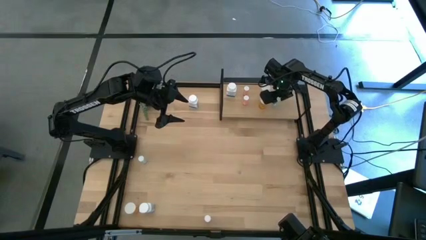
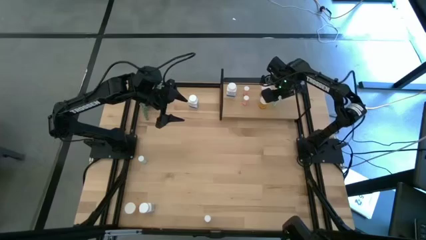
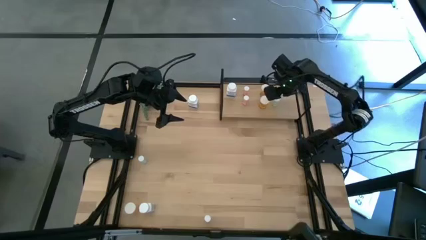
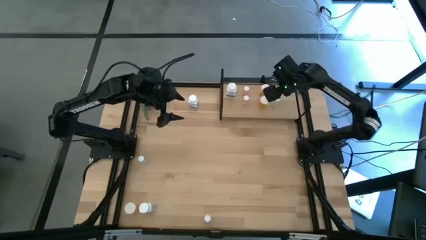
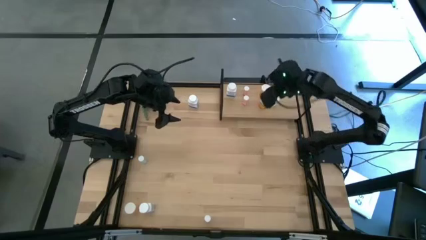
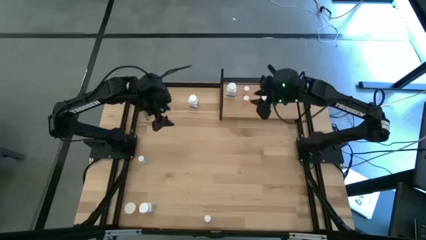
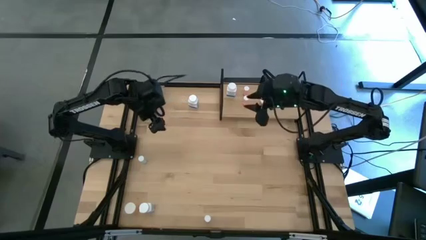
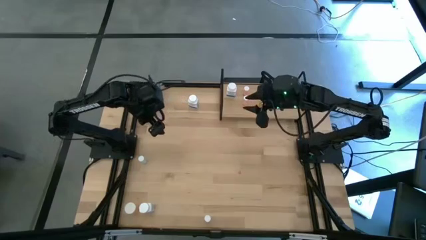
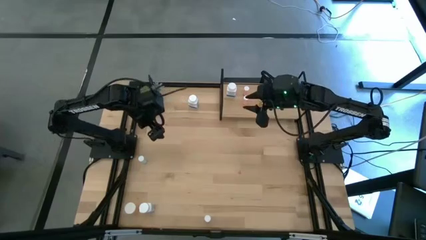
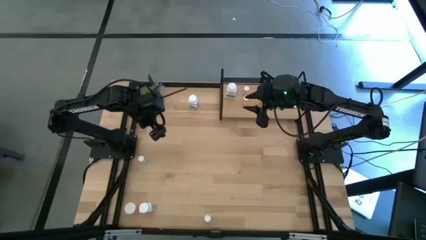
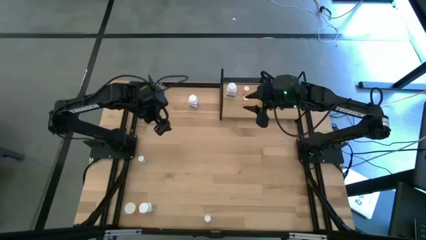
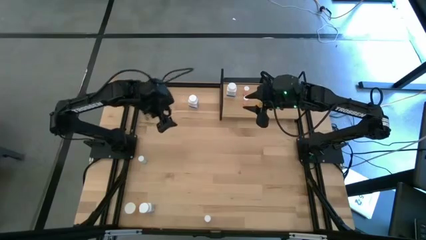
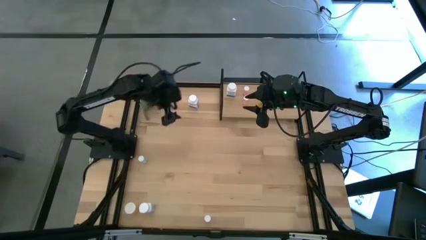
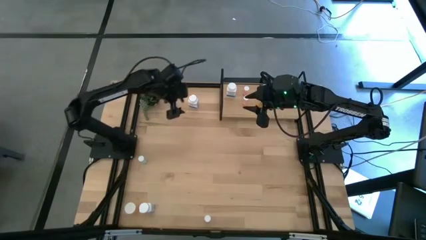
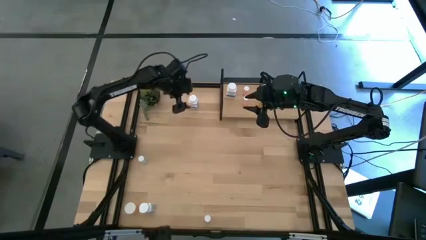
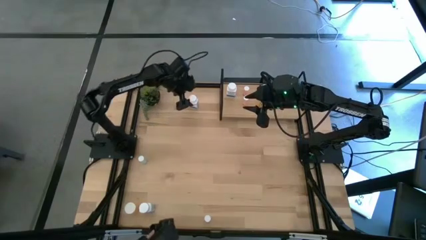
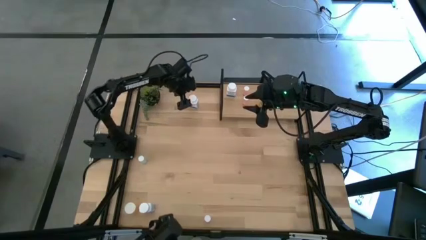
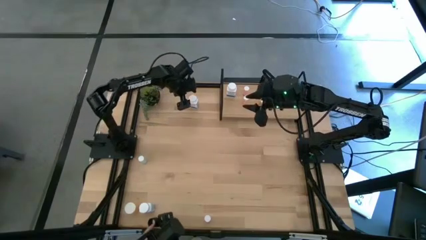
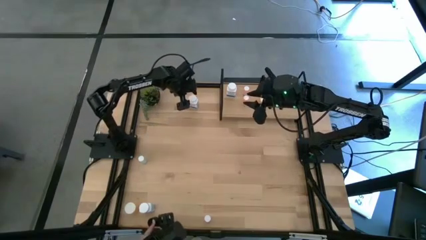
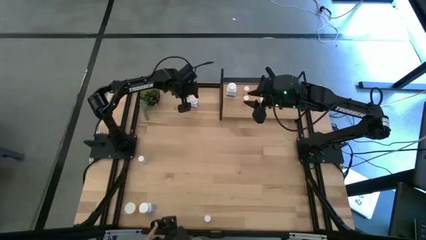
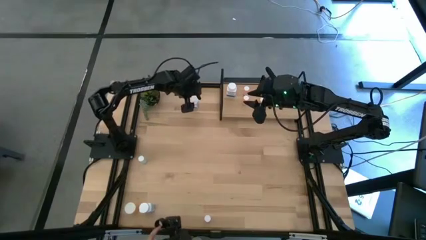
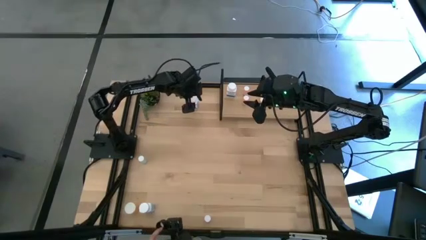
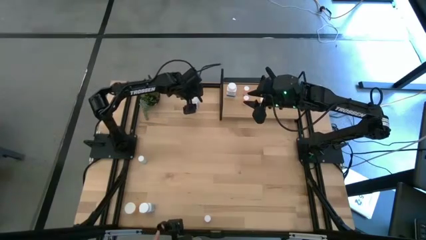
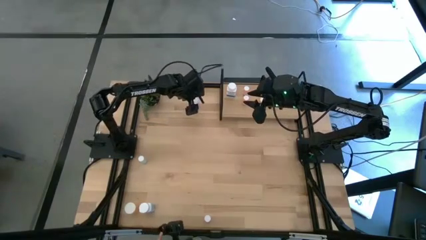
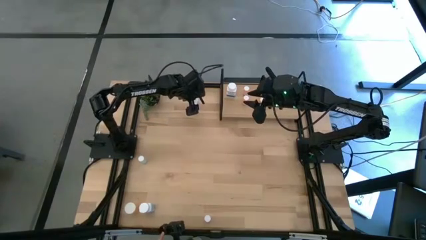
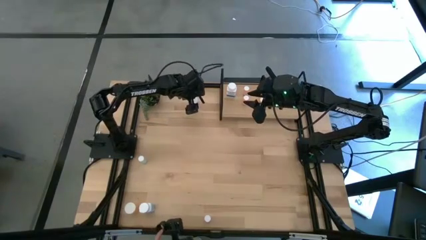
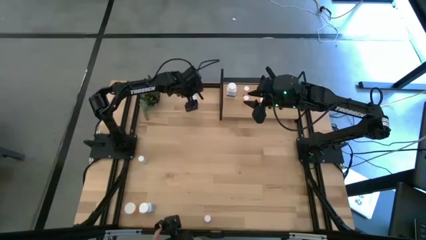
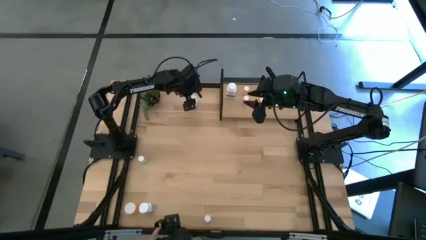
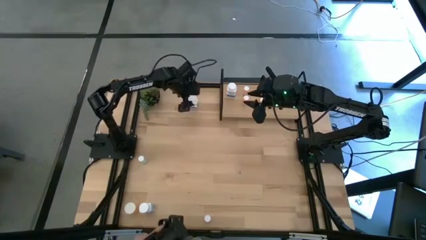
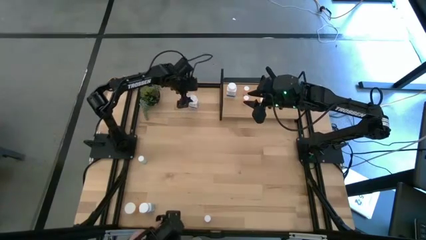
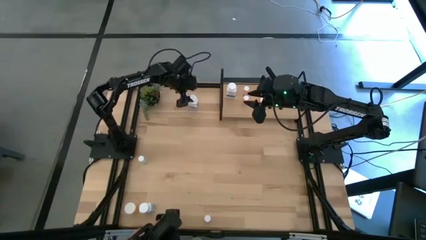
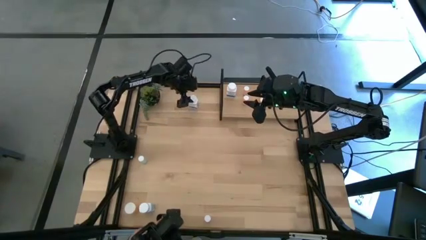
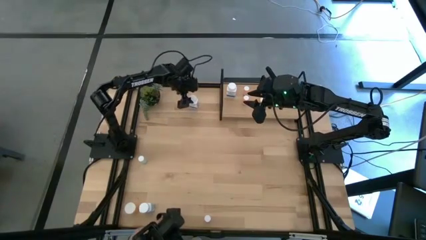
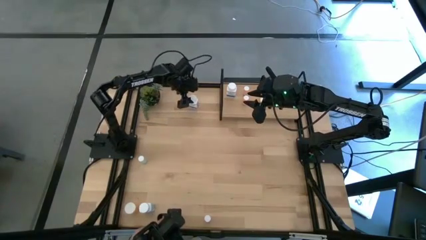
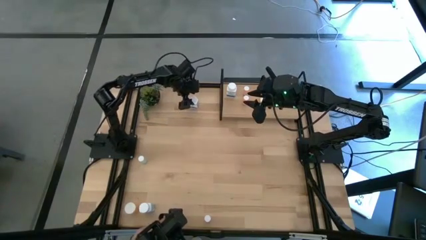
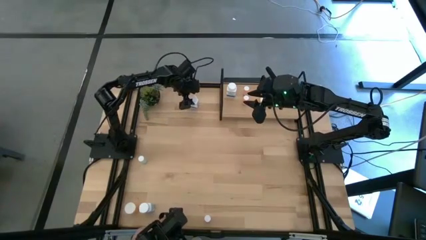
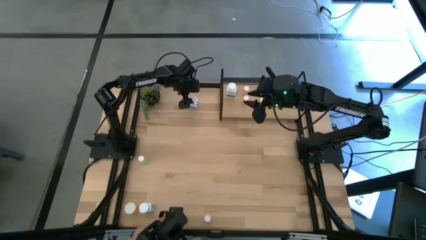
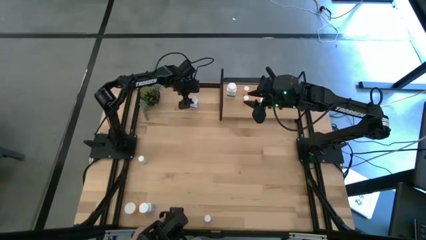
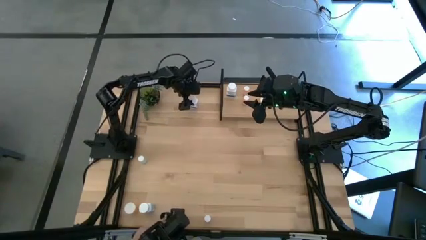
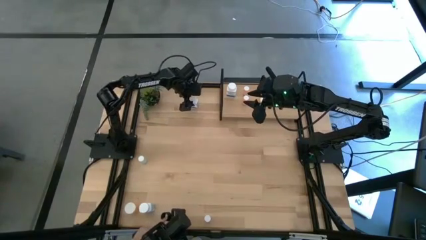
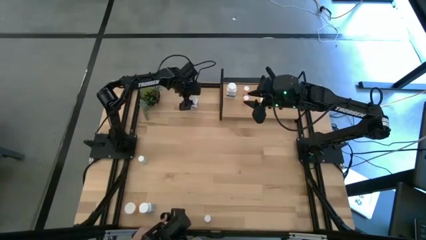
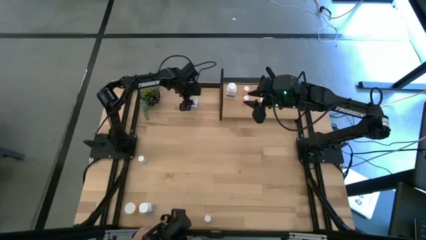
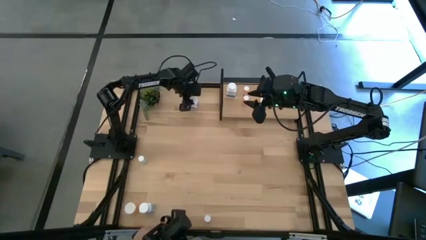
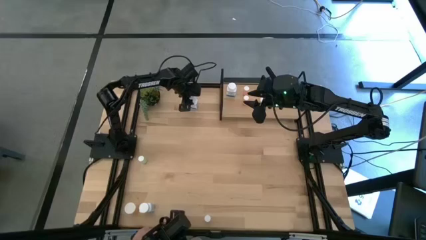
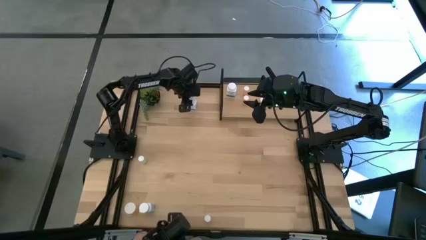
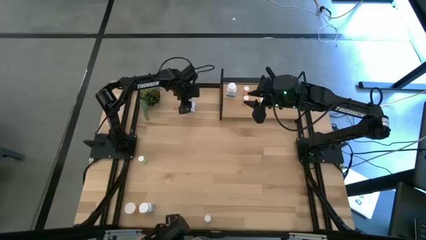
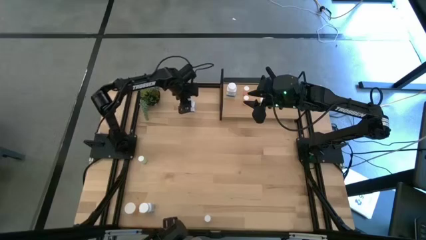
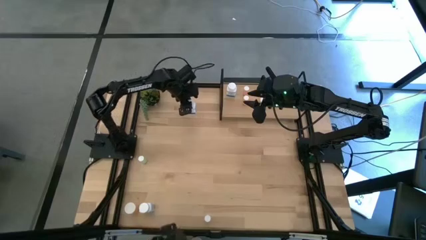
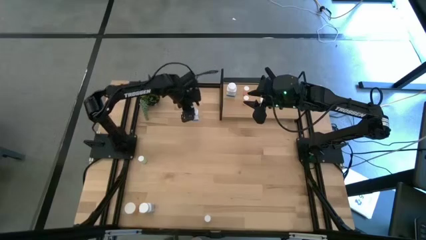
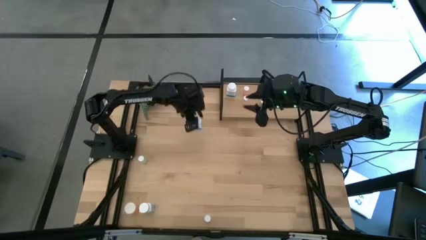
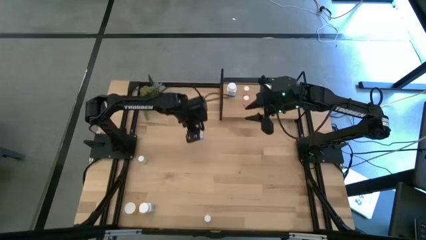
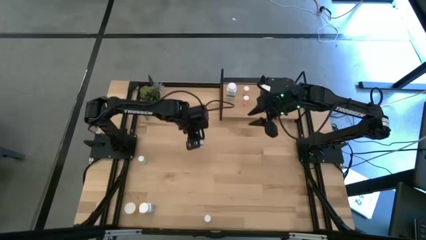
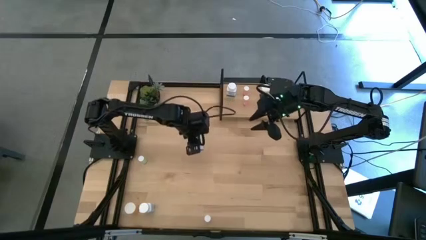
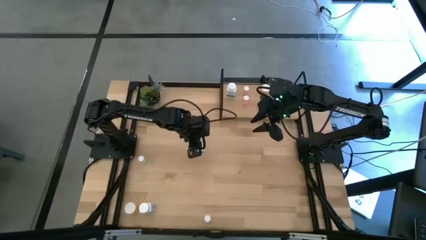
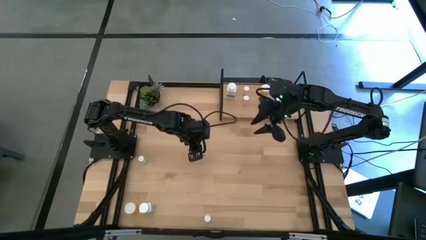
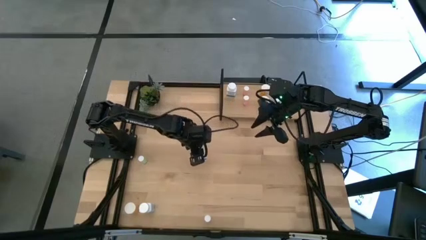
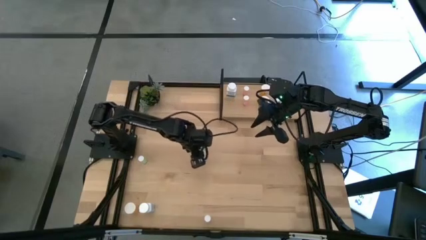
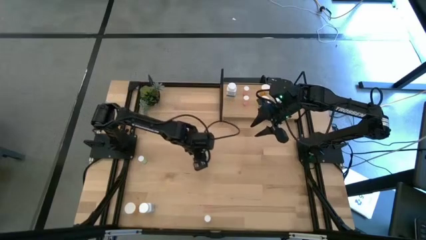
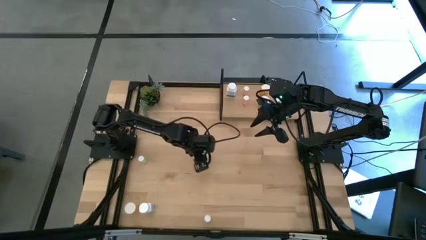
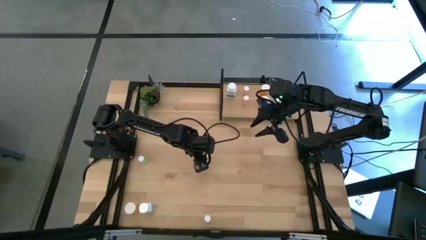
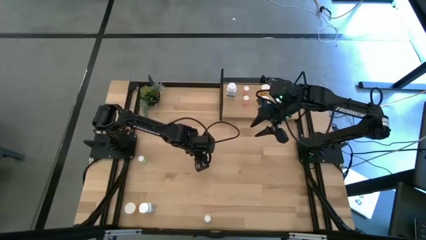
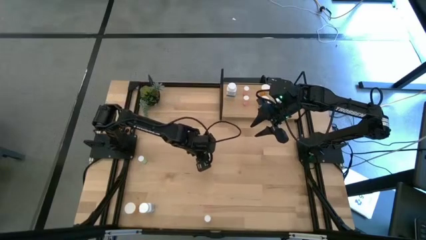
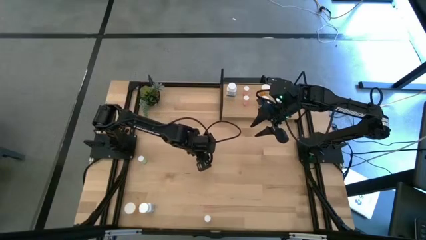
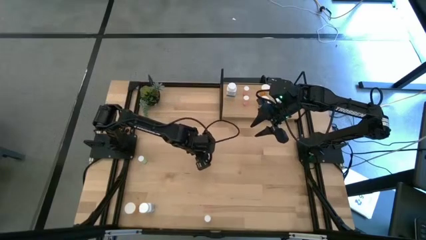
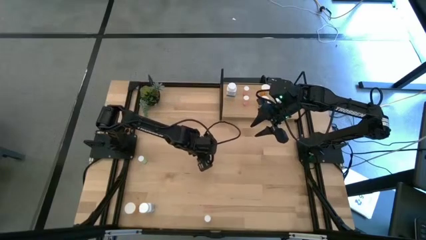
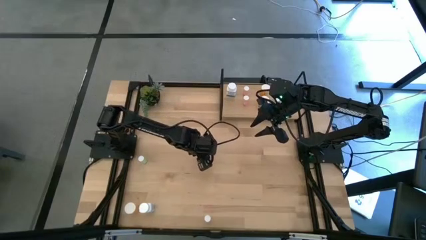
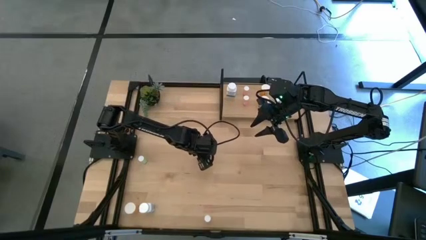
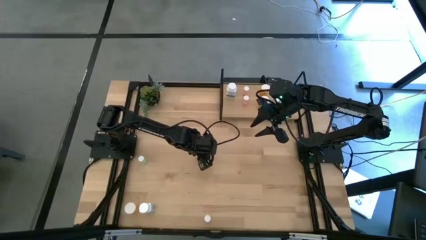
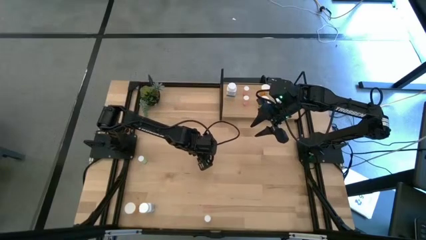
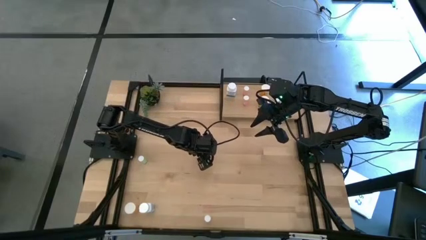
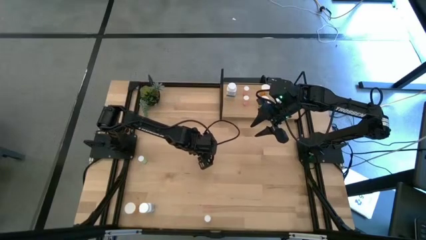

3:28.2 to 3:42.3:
Task: Pick and place medicine bottles onto shelf by color
Put the top white pill bottle on the shelf aligned with the other white pill bottle
